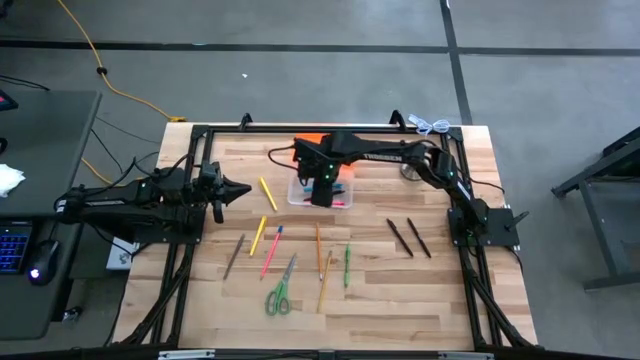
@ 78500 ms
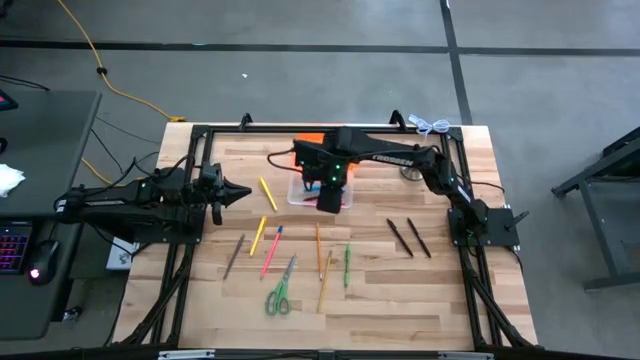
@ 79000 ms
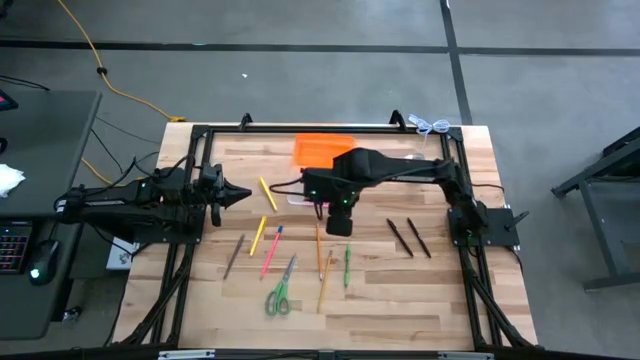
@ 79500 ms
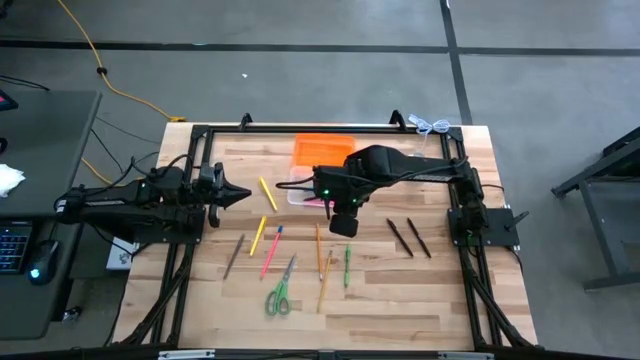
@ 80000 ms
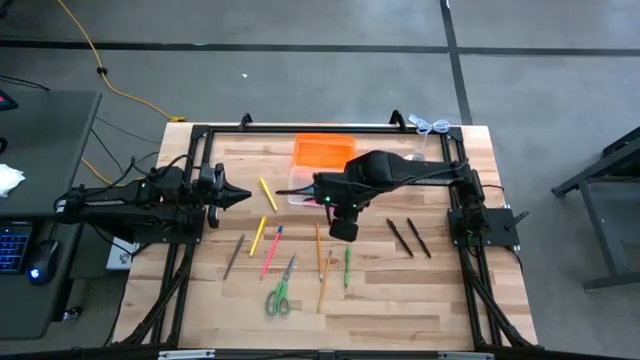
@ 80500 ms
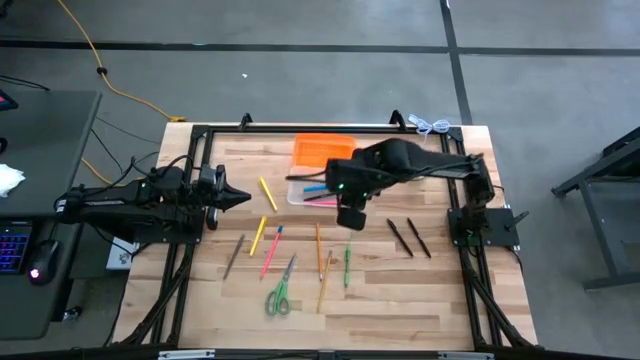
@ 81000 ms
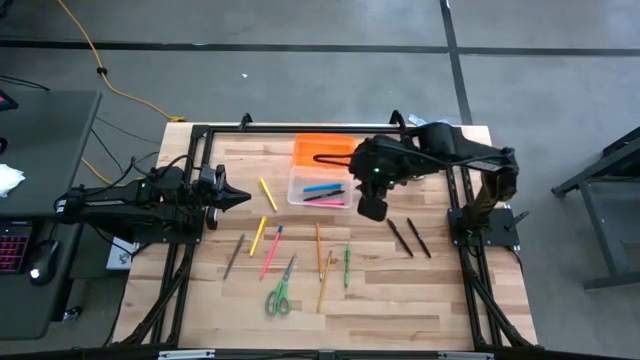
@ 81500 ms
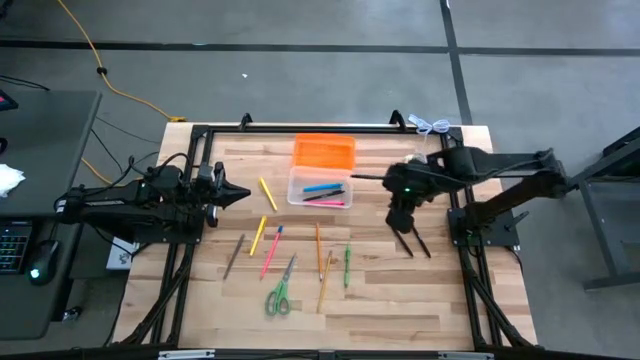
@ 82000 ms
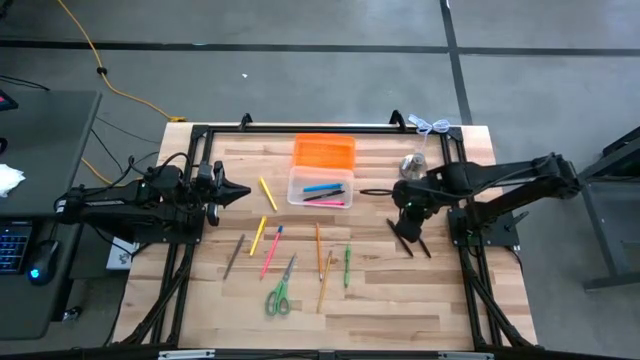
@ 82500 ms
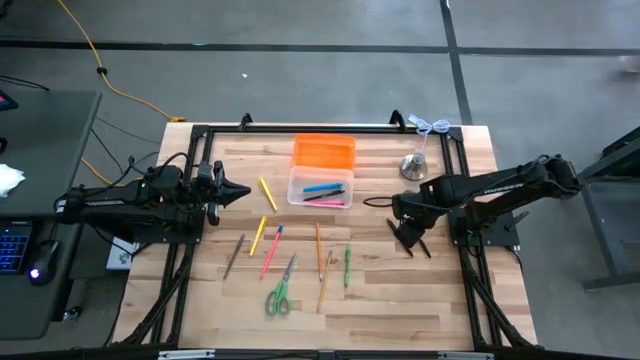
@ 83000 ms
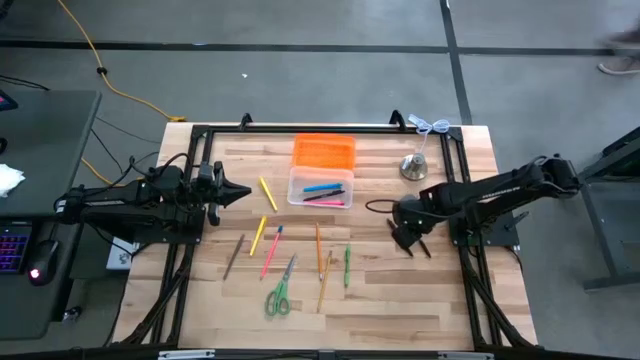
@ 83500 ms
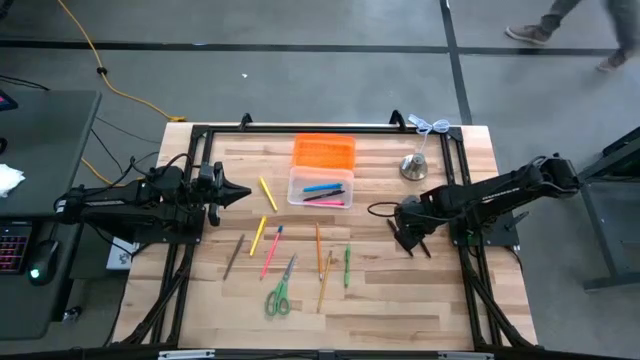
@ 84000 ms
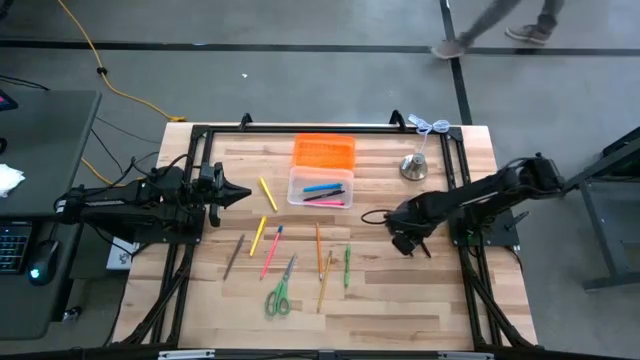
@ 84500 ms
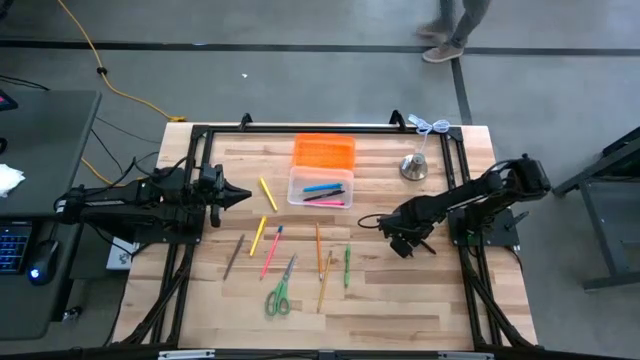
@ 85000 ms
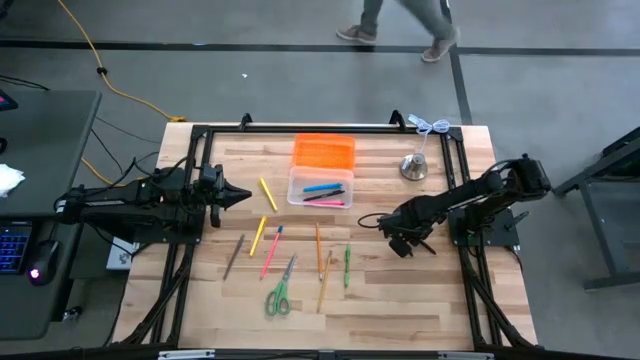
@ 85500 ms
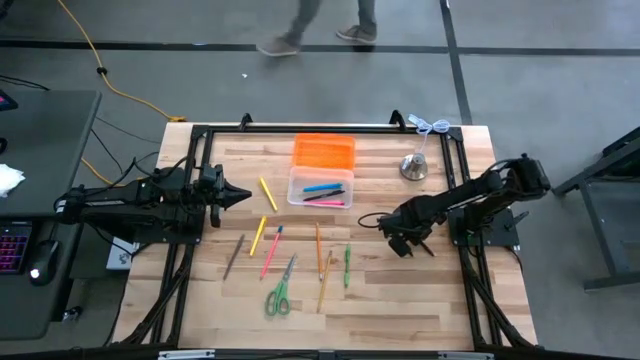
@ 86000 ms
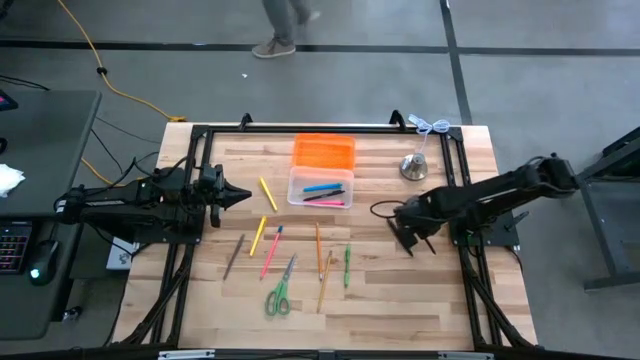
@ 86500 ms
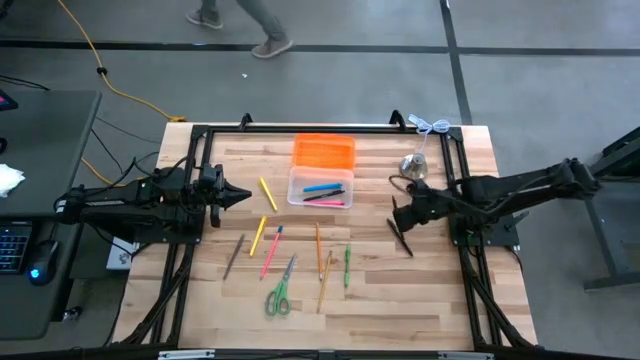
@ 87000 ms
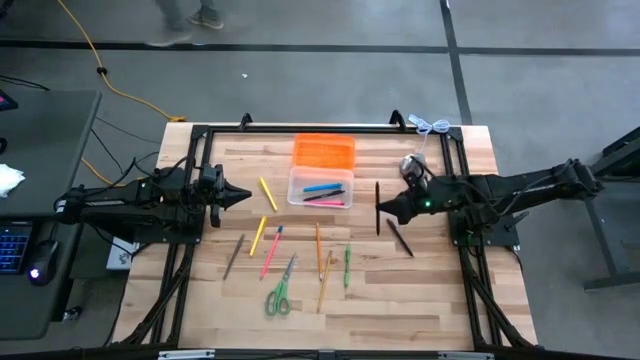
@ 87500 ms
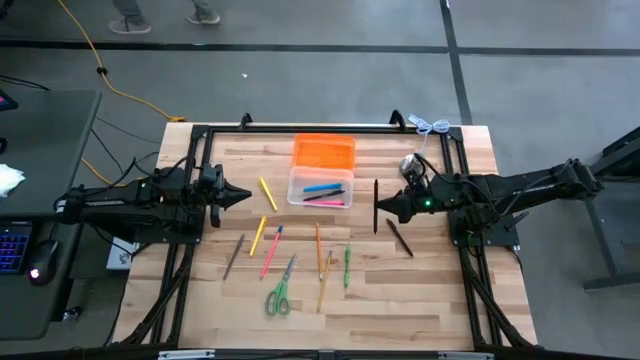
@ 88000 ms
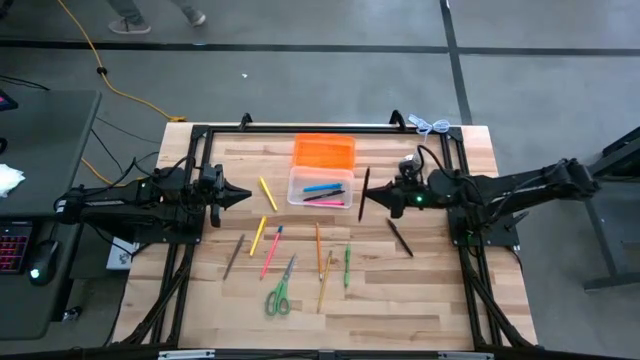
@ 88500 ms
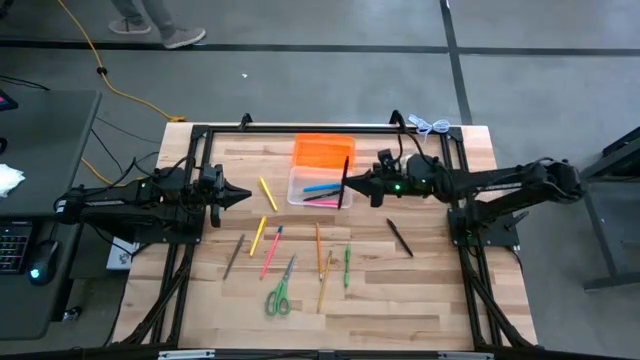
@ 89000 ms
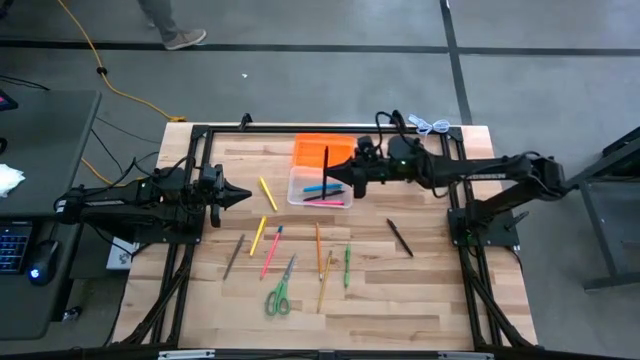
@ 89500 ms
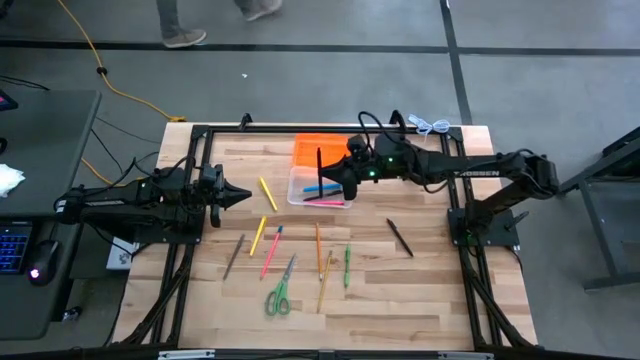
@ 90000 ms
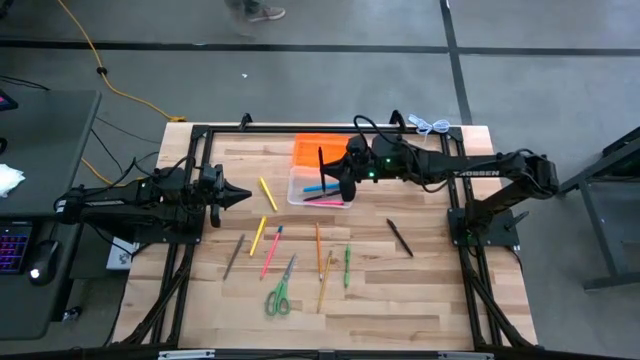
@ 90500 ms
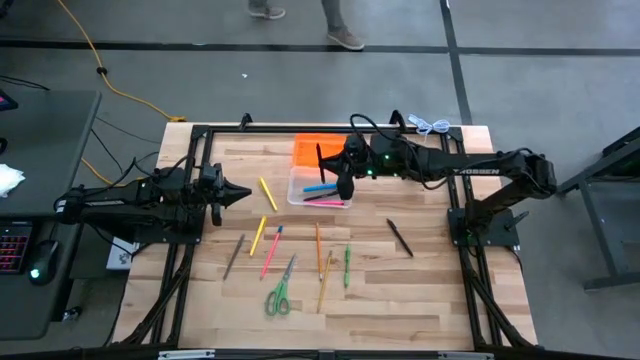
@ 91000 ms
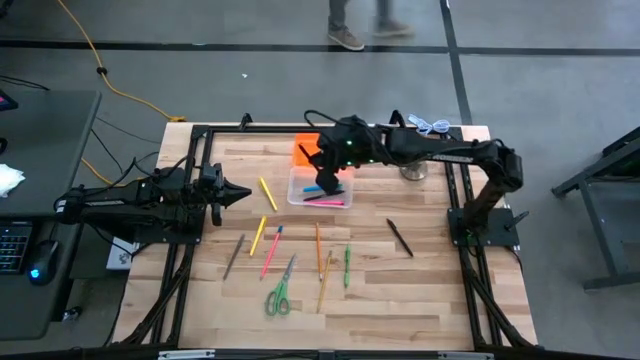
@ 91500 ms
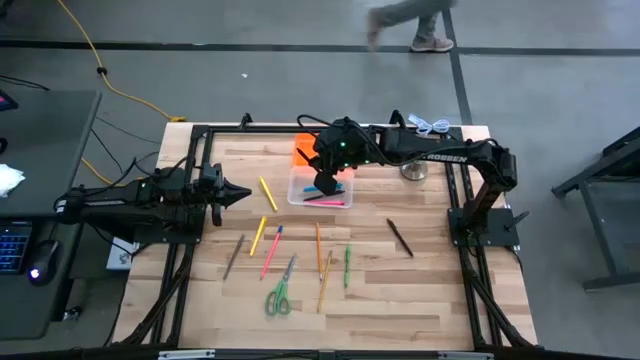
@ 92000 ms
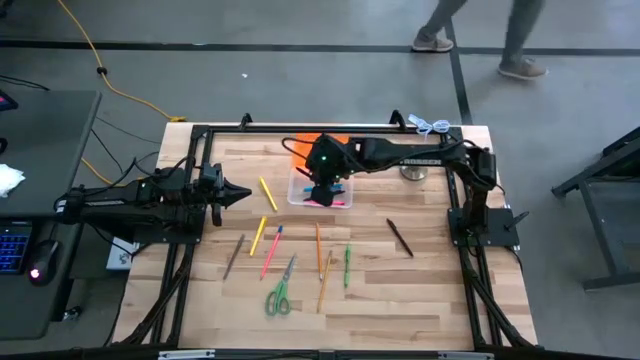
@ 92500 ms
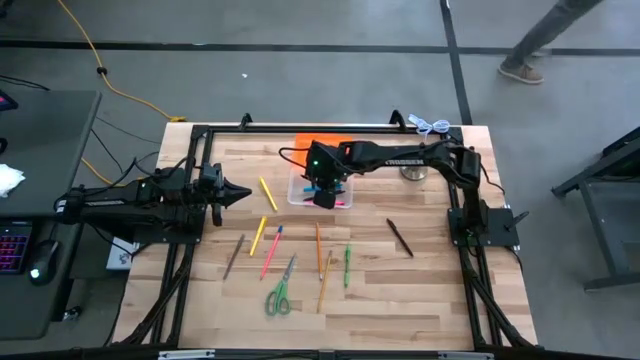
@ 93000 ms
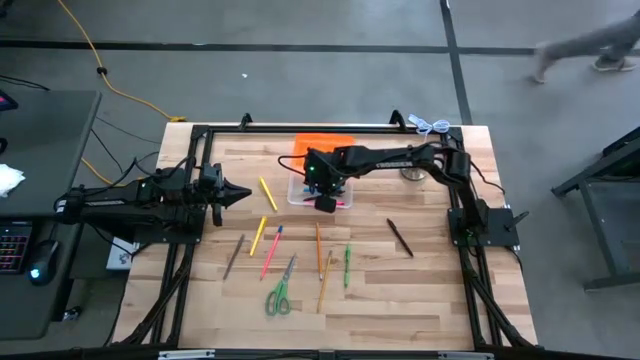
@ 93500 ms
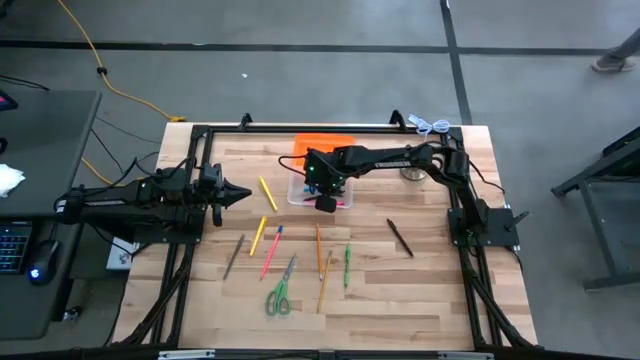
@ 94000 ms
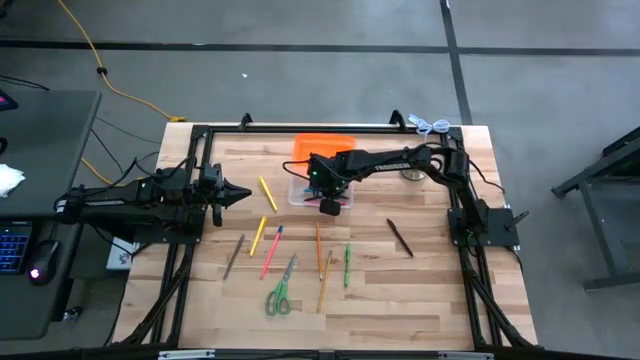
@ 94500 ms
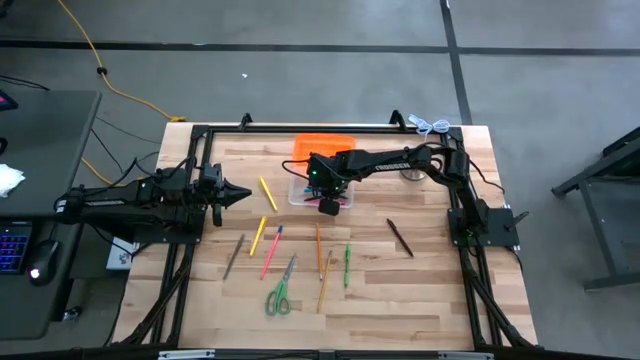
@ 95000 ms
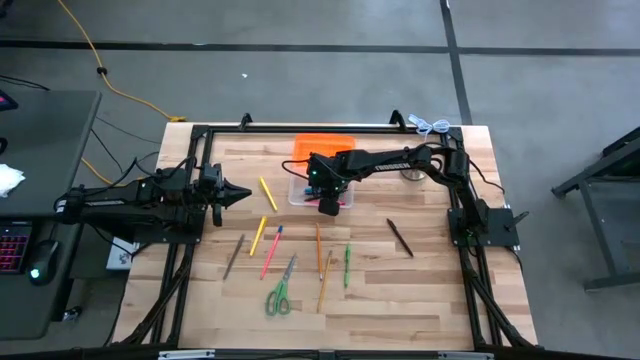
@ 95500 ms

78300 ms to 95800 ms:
Task: Pick & place school supplies into a supply box
Put the black pen into the transparent supply box

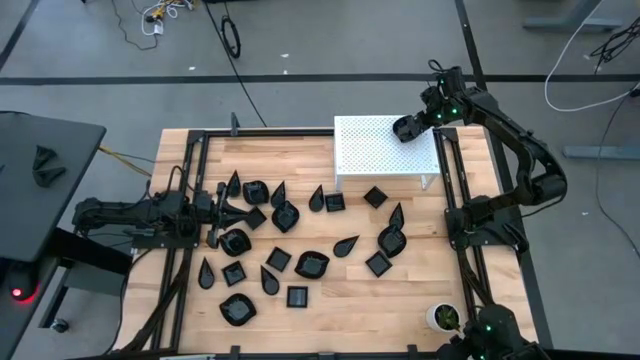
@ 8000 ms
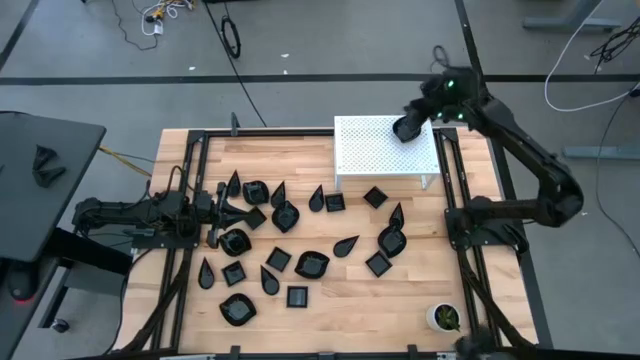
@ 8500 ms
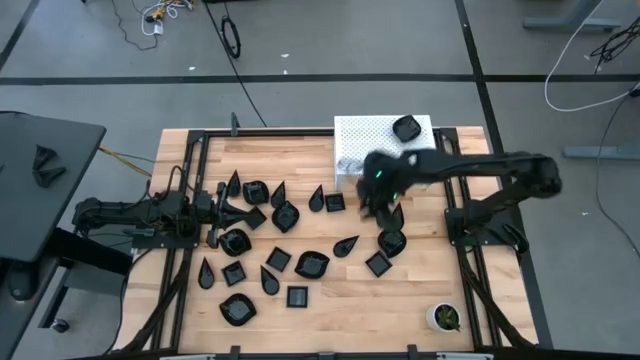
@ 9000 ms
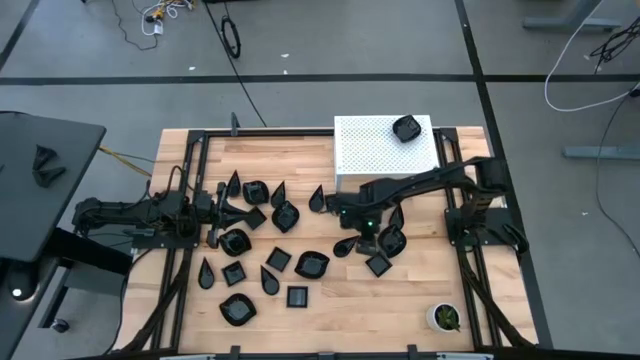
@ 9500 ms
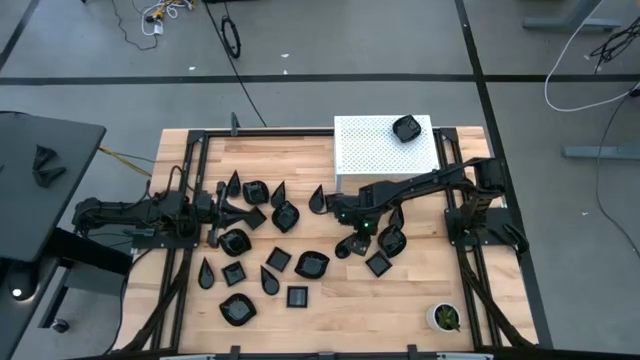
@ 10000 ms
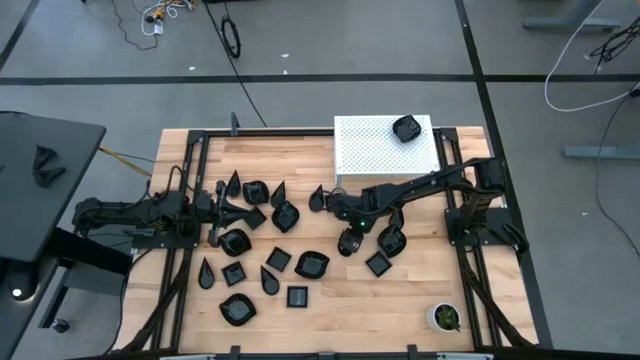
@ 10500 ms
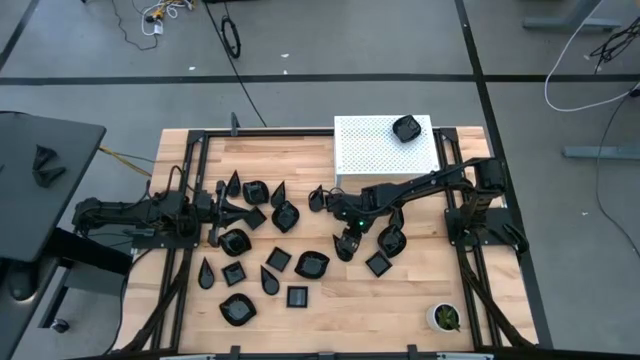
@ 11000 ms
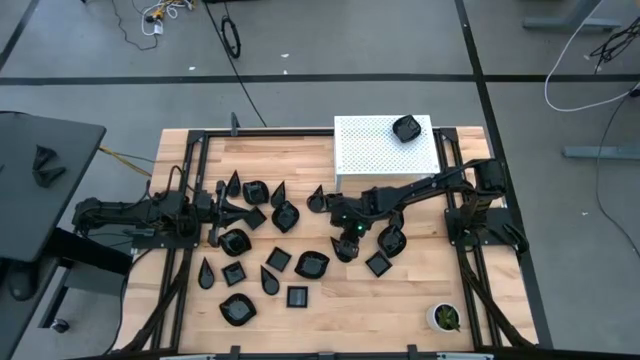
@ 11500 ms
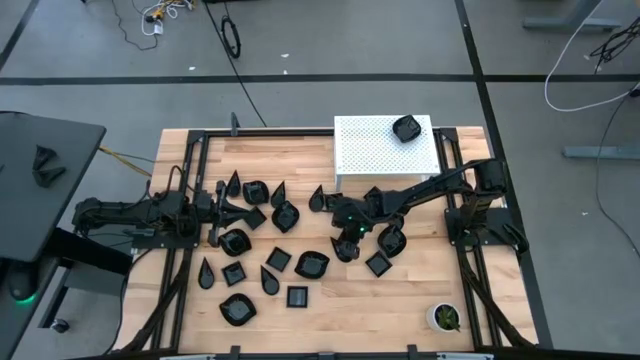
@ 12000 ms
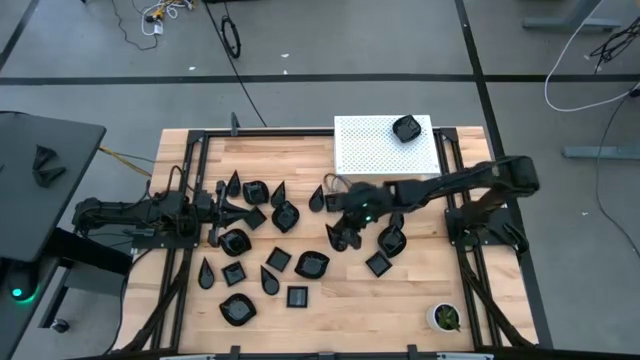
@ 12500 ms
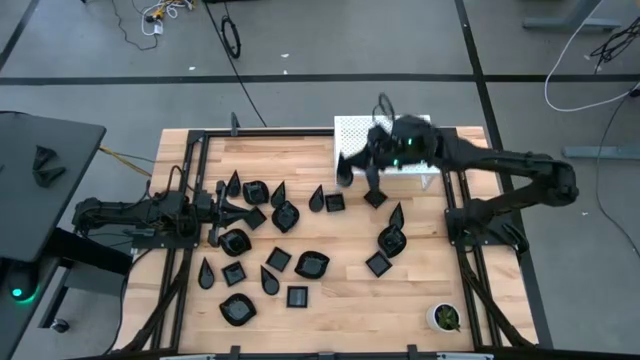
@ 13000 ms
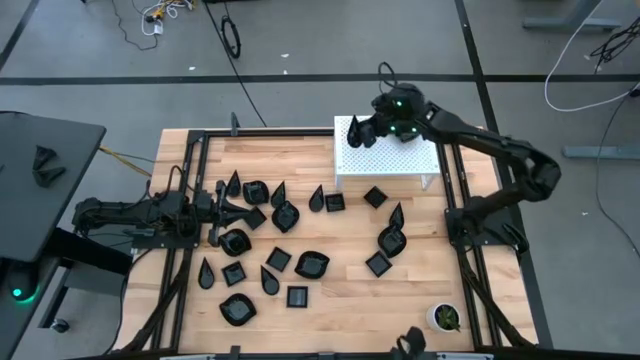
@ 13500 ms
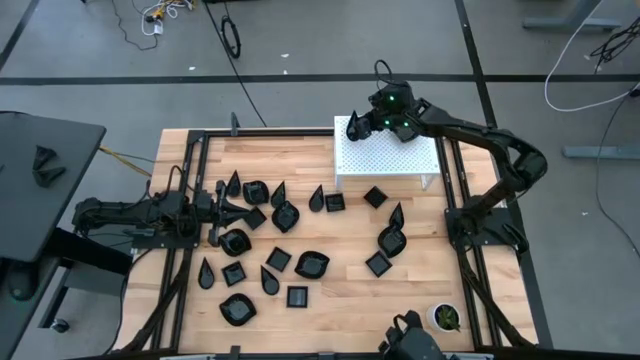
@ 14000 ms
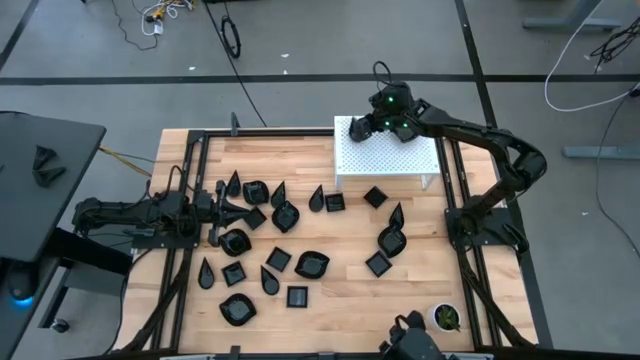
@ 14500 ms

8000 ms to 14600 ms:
Task: Pick & Place Mini shaped plates
Put the black drop shaped plate on the shelf
